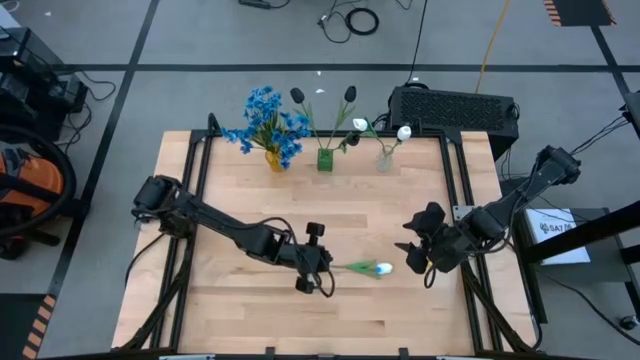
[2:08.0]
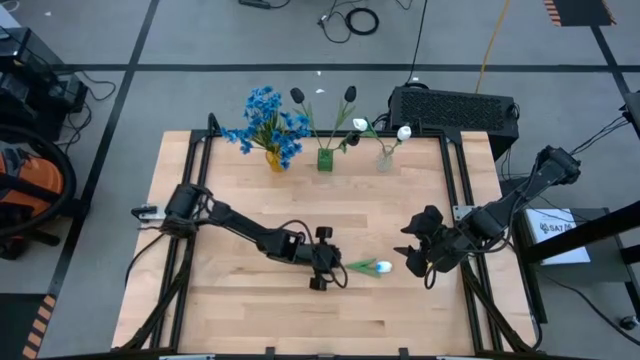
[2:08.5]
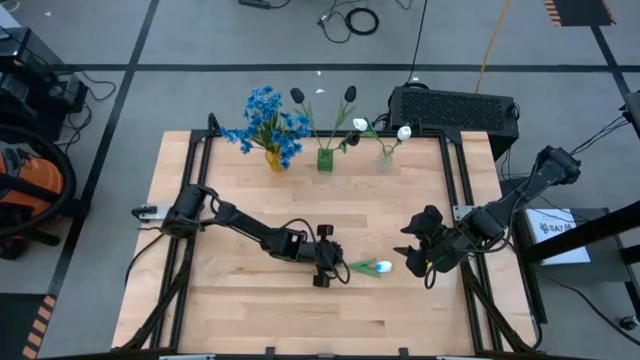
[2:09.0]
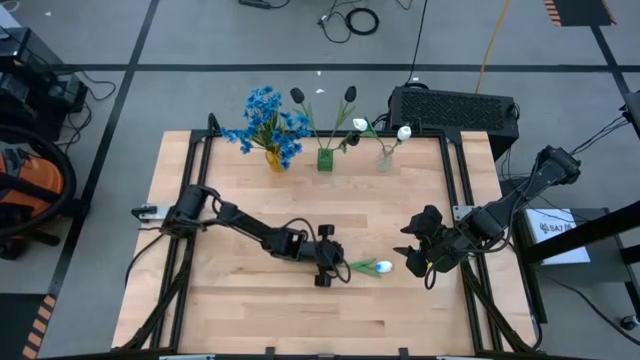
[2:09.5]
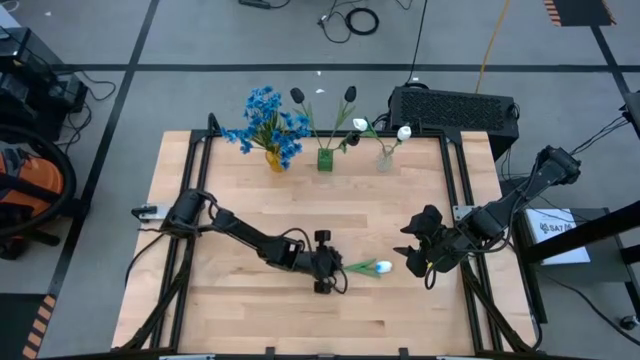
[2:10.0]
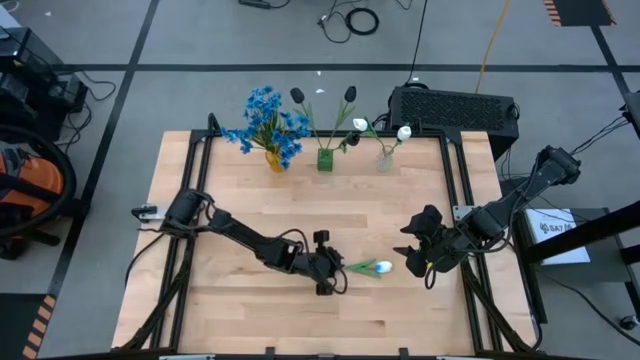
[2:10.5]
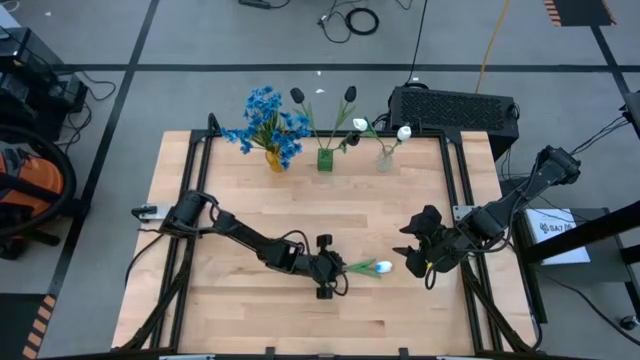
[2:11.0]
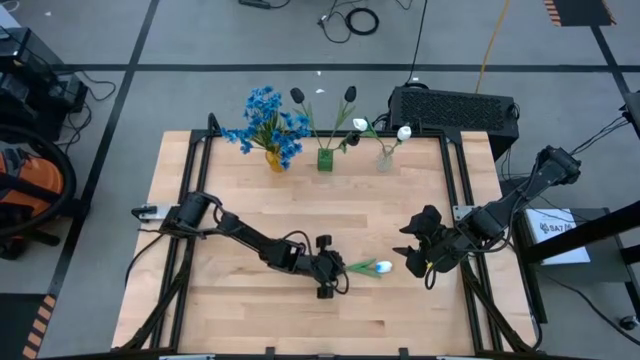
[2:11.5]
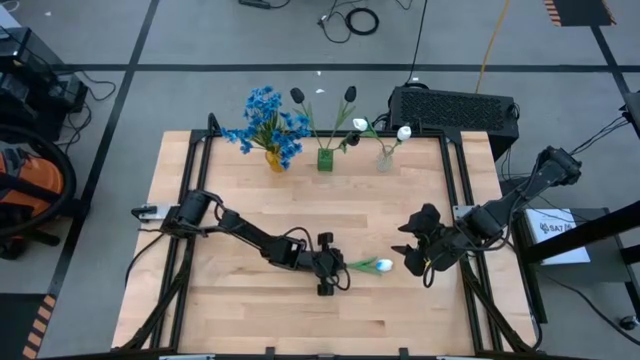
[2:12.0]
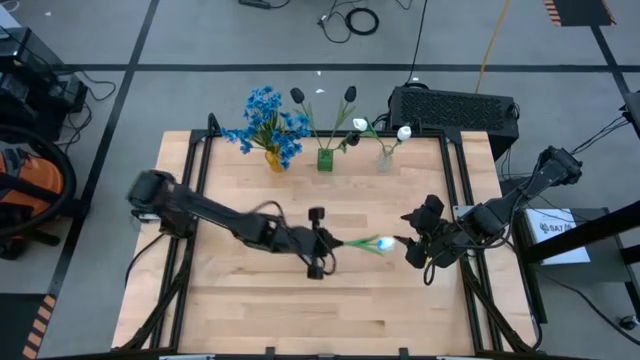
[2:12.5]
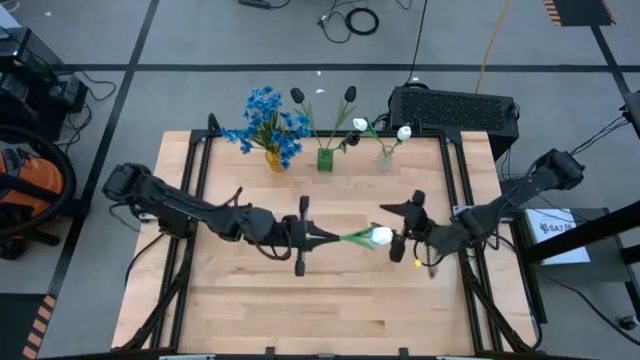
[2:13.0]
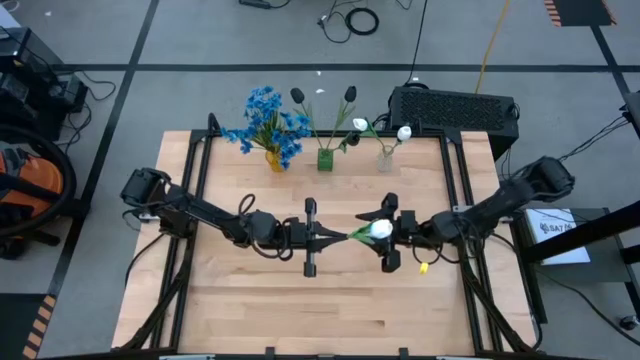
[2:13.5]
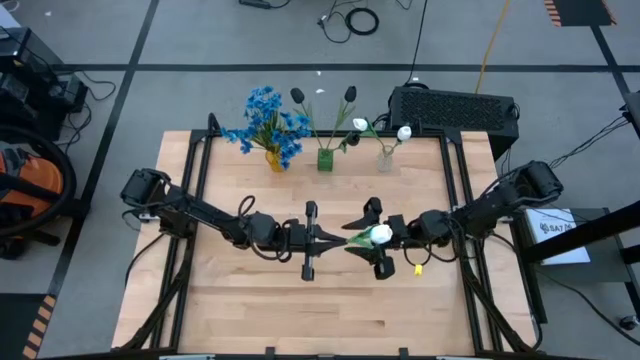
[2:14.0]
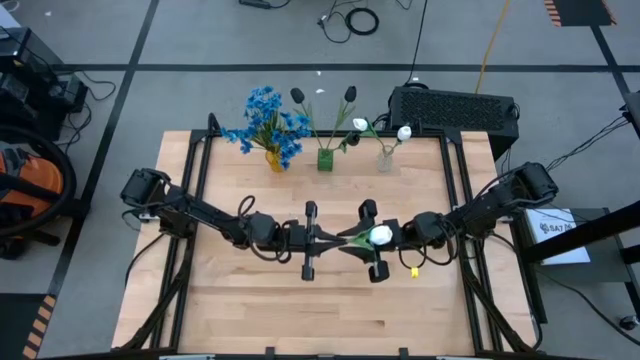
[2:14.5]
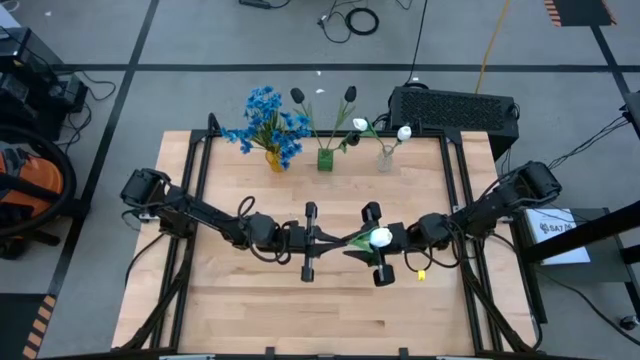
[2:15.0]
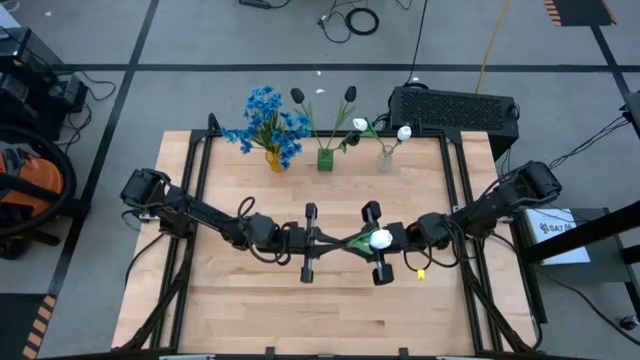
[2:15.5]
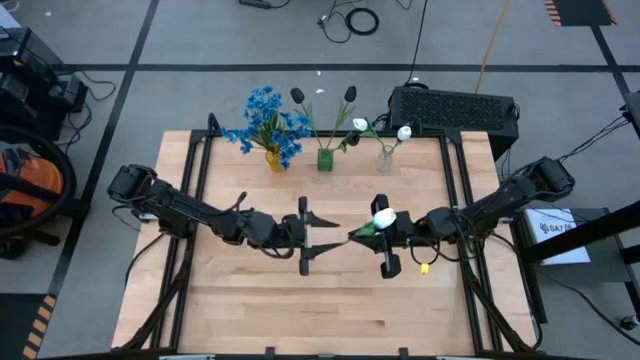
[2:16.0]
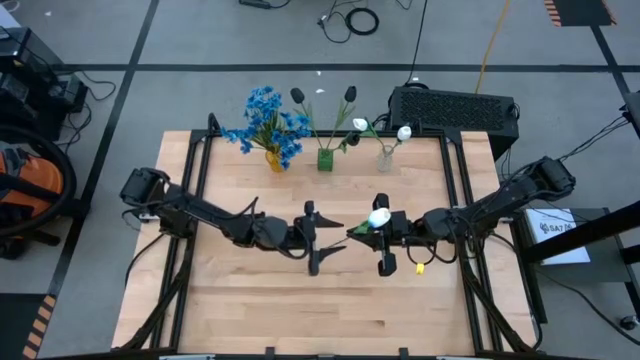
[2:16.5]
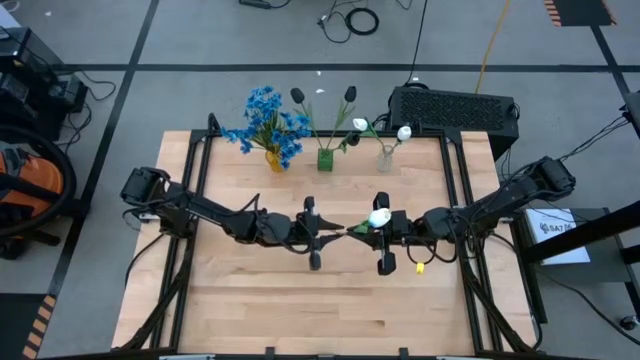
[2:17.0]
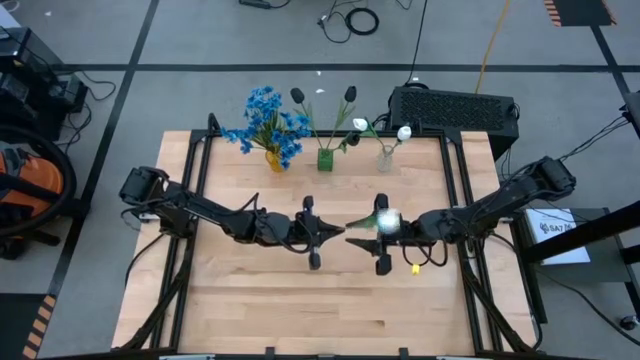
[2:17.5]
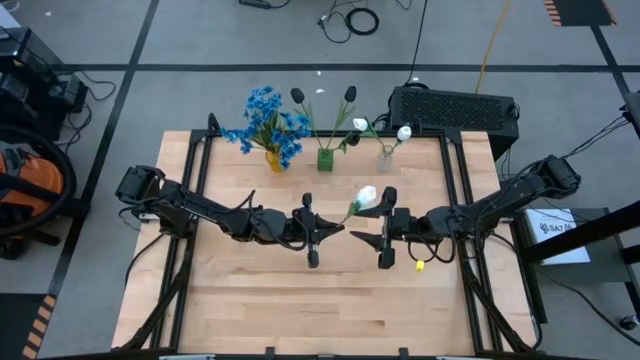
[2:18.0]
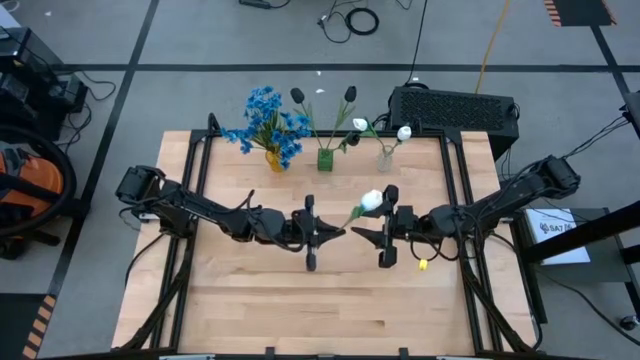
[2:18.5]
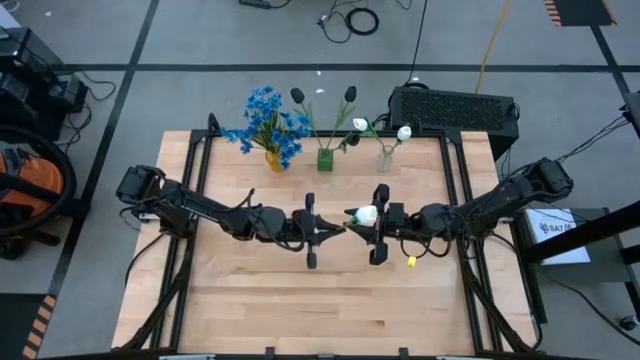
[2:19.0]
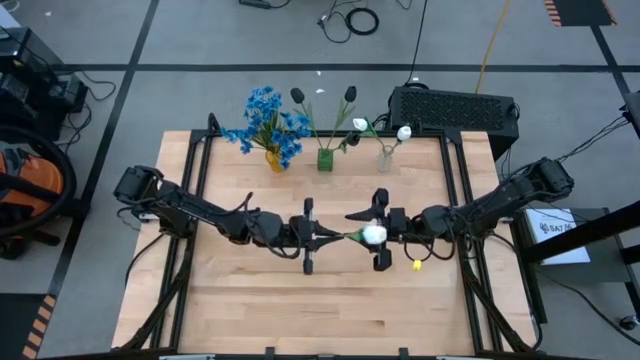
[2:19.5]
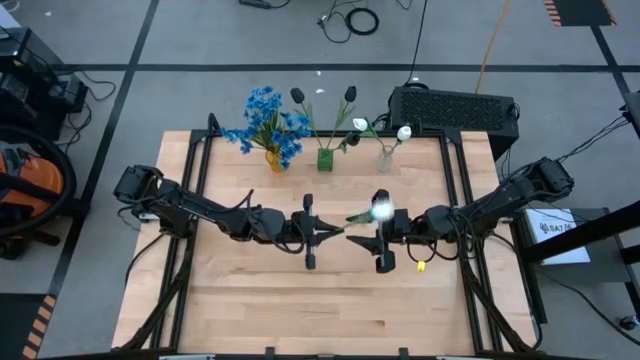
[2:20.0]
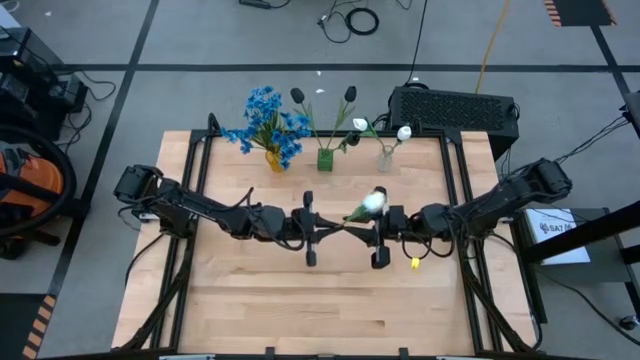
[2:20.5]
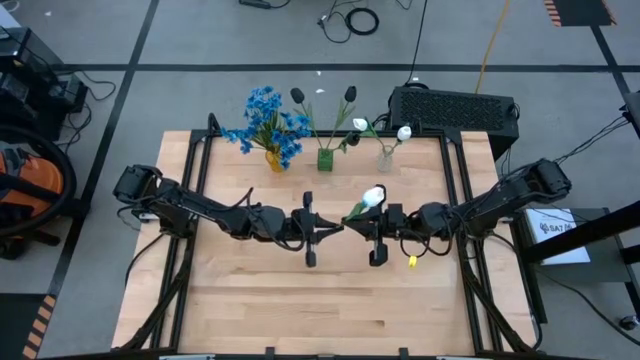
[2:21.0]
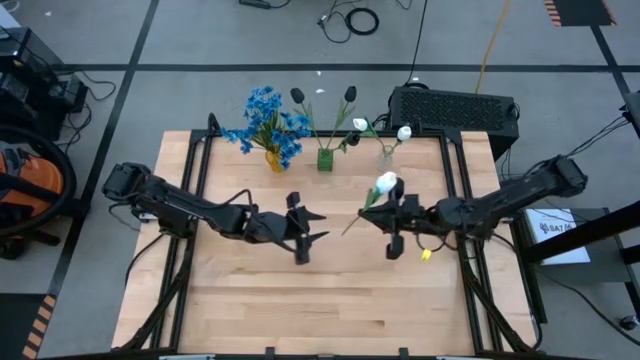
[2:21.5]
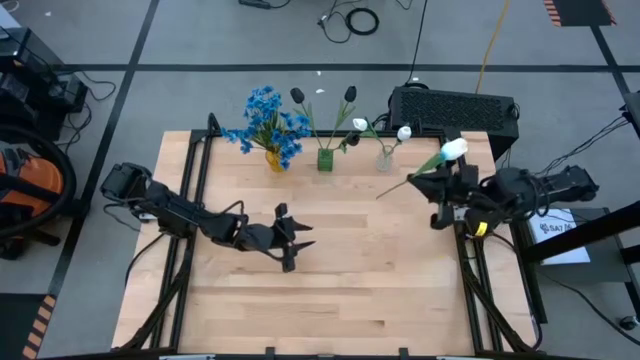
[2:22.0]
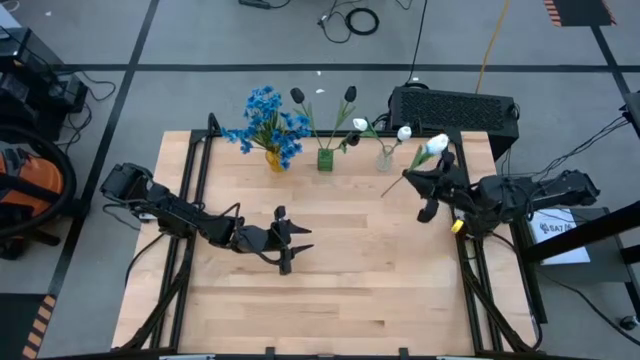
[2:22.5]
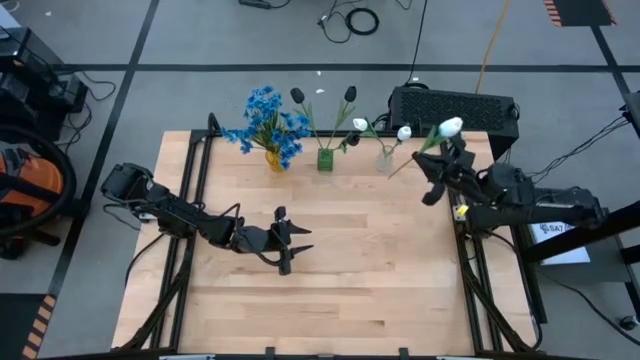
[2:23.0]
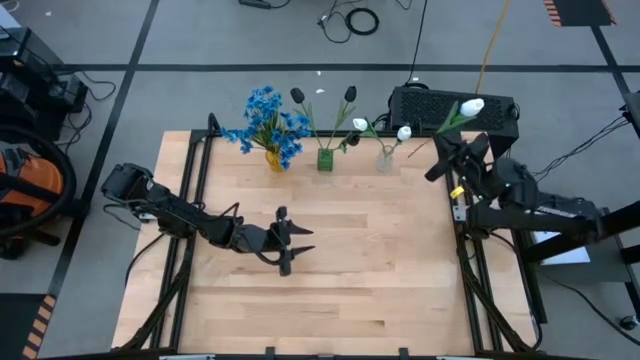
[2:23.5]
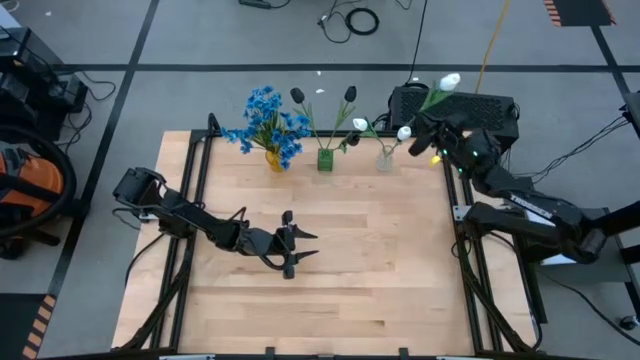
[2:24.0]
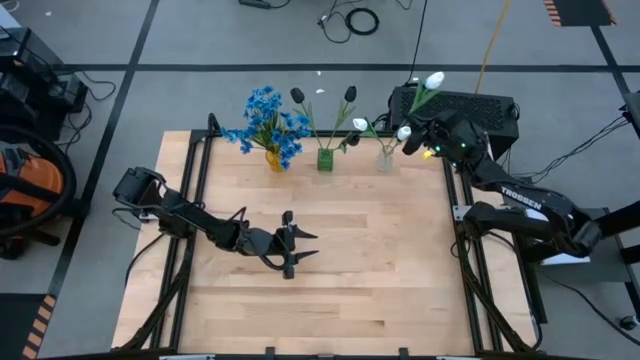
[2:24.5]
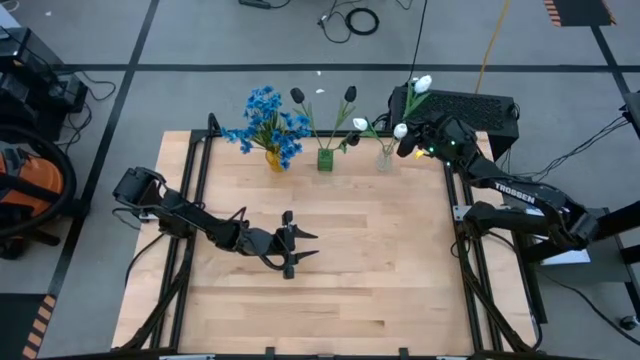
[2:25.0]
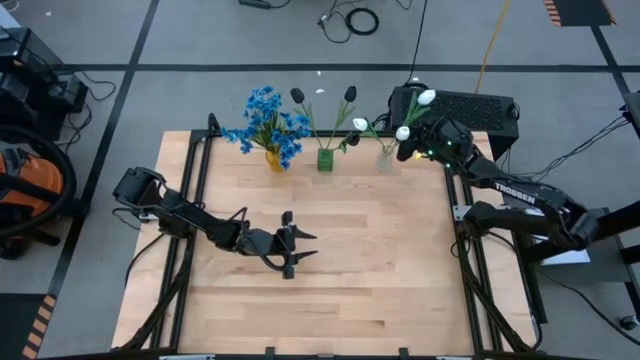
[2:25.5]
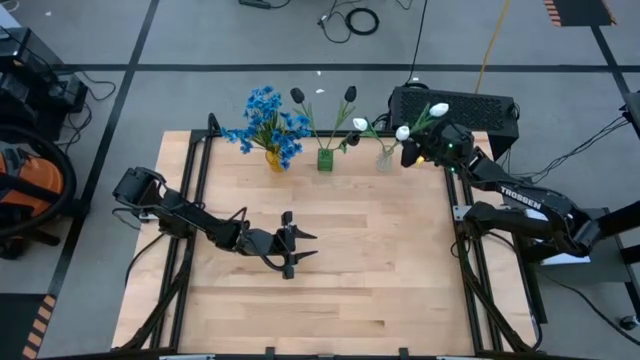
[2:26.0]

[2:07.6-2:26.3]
Task: Sort flowers into vase by color
Put the white tulip into the transparent vase

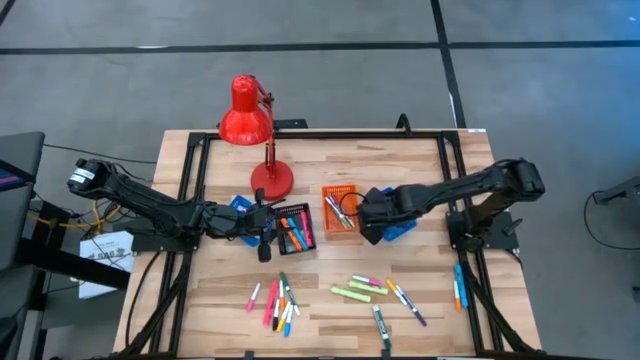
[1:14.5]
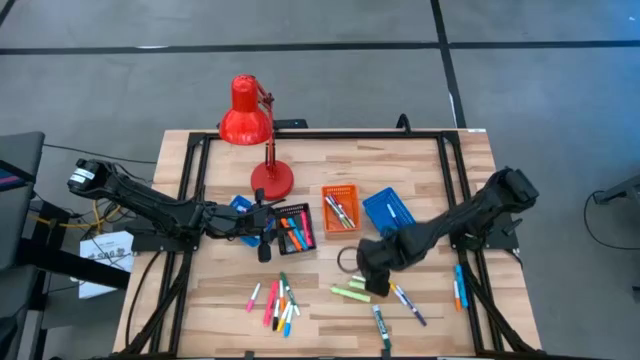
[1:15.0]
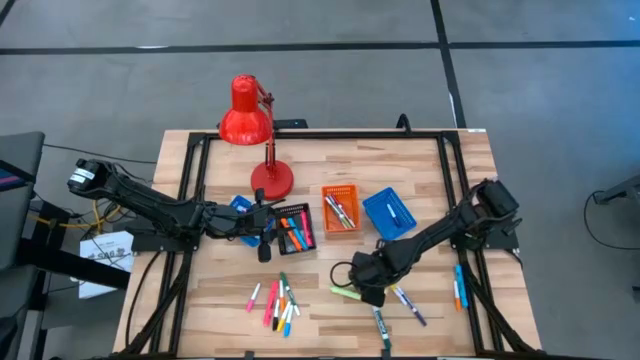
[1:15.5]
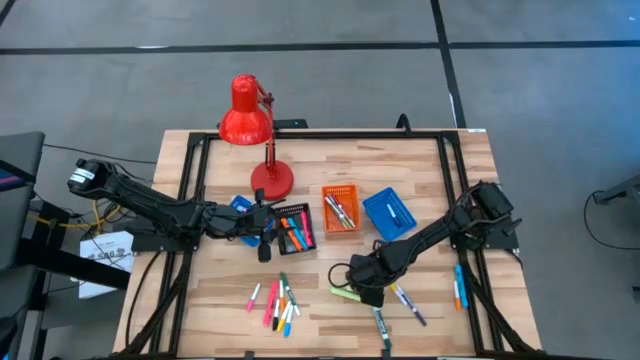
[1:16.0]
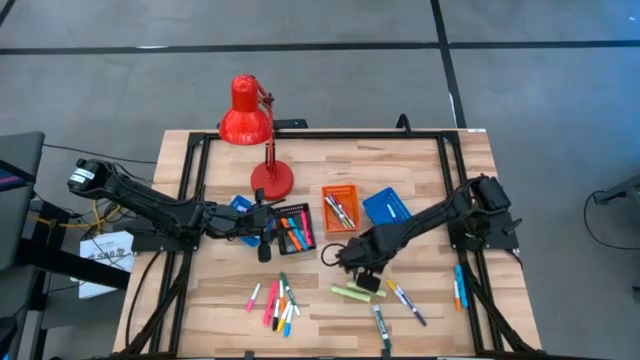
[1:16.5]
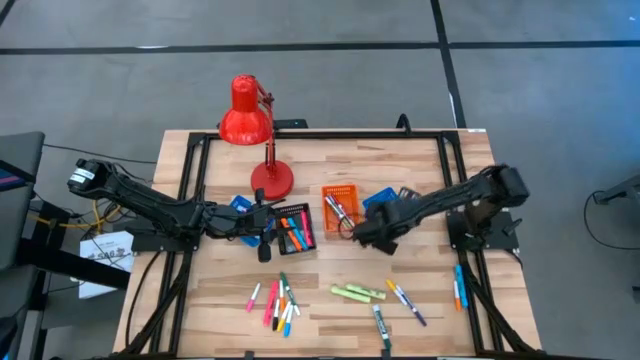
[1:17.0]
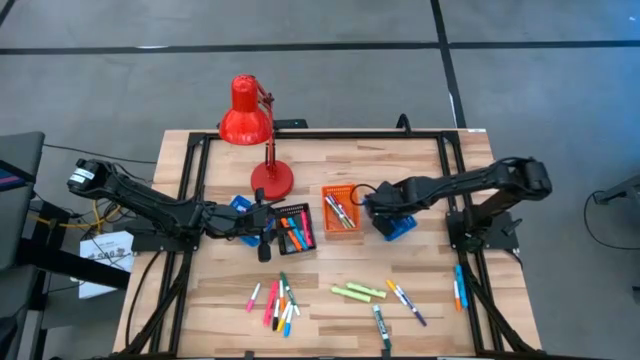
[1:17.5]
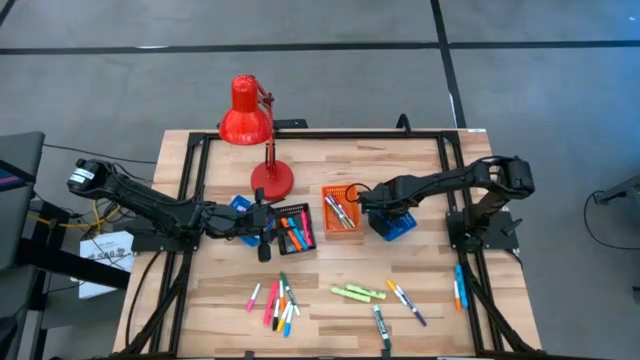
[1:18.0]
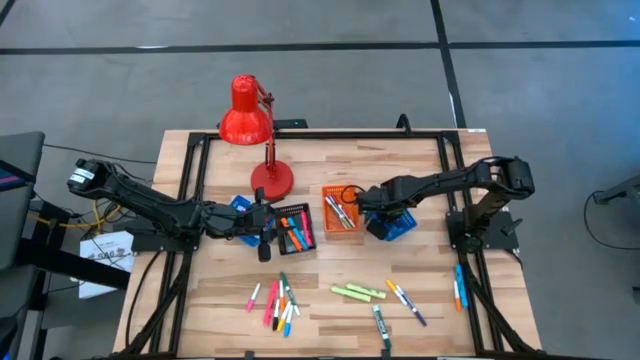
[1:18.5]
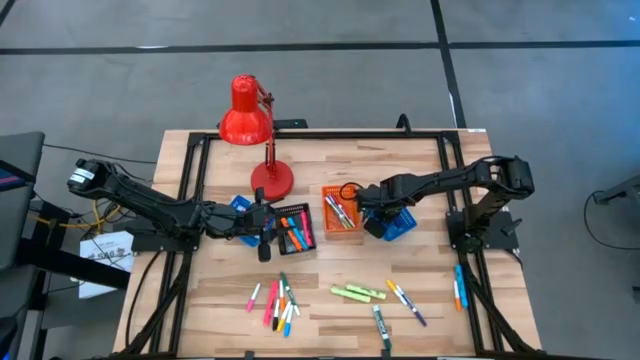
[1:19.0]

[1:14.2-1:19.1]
Task: Pick & Place Markers
Put the right small white and pink highlighter pen into the right blue basket
